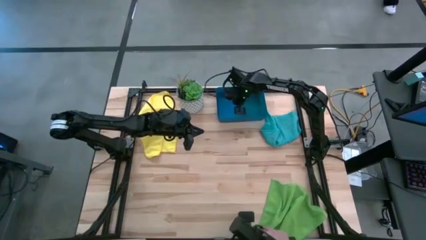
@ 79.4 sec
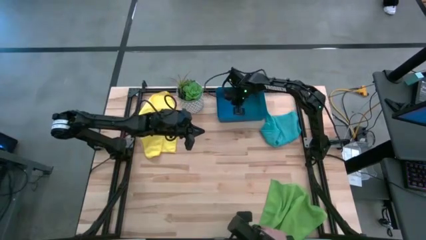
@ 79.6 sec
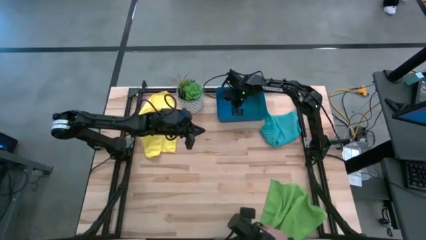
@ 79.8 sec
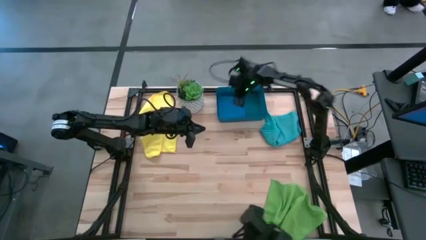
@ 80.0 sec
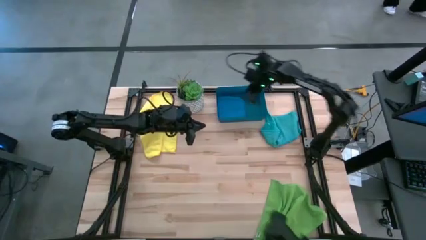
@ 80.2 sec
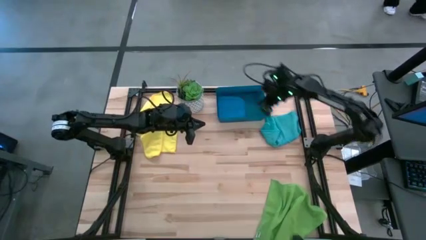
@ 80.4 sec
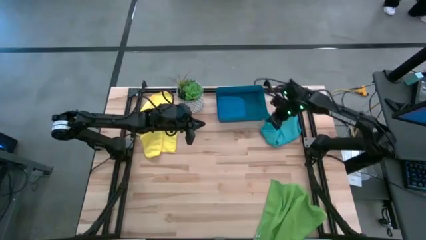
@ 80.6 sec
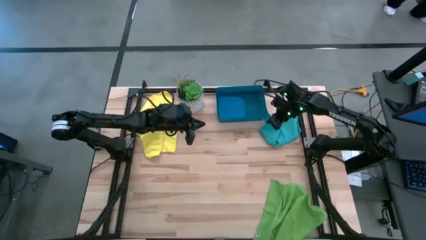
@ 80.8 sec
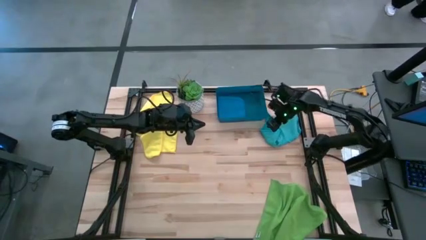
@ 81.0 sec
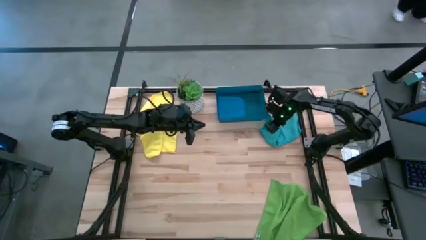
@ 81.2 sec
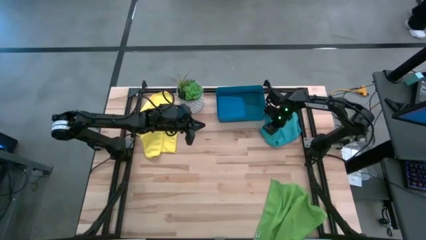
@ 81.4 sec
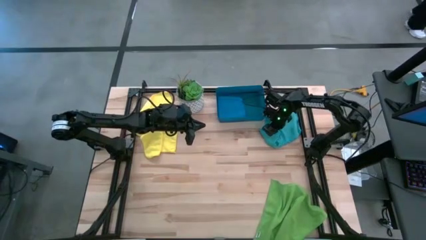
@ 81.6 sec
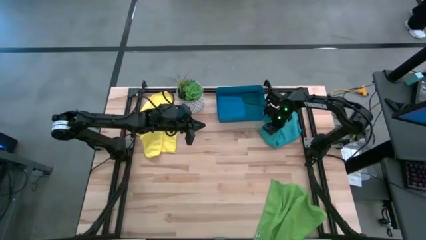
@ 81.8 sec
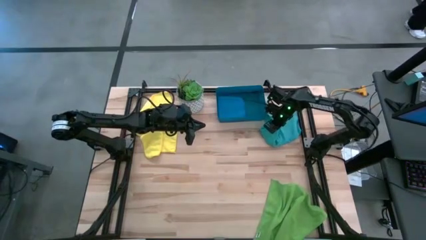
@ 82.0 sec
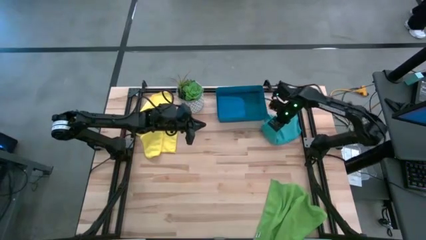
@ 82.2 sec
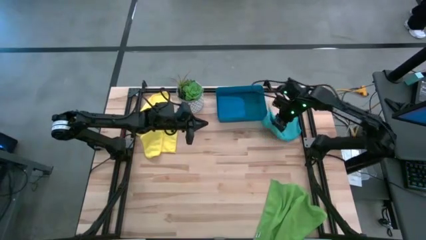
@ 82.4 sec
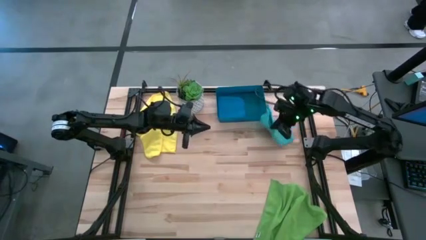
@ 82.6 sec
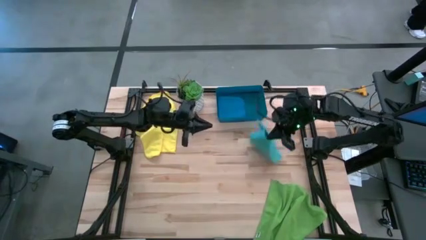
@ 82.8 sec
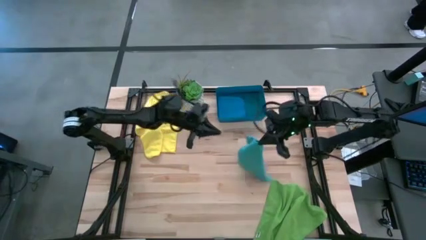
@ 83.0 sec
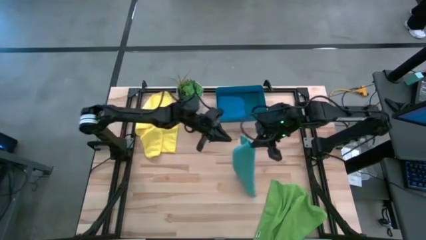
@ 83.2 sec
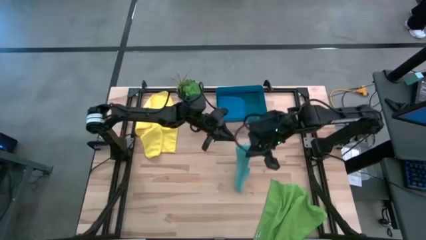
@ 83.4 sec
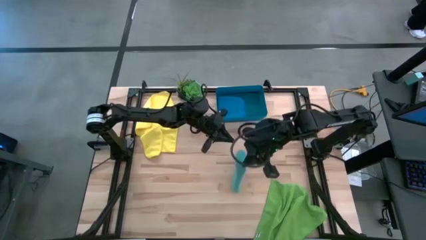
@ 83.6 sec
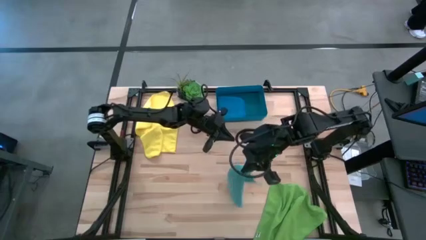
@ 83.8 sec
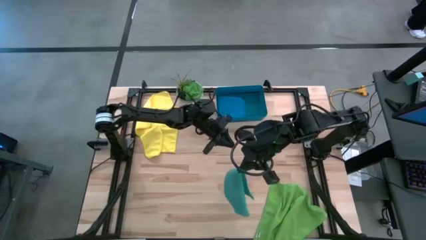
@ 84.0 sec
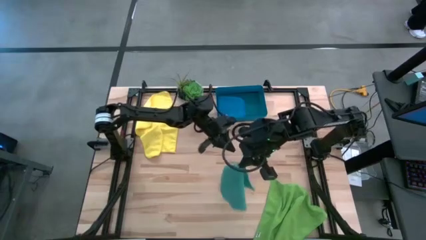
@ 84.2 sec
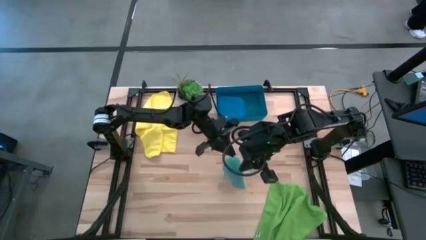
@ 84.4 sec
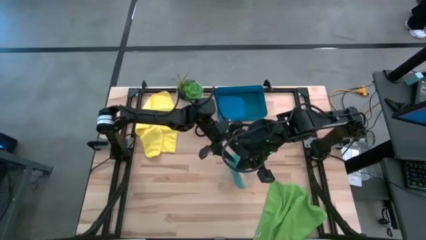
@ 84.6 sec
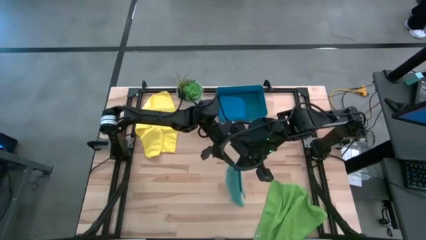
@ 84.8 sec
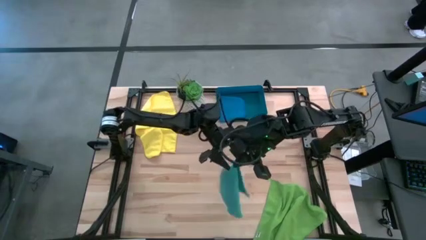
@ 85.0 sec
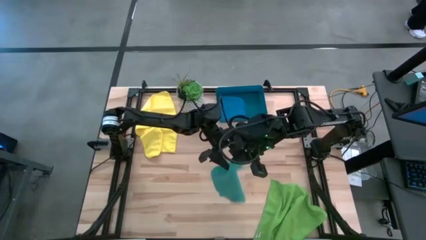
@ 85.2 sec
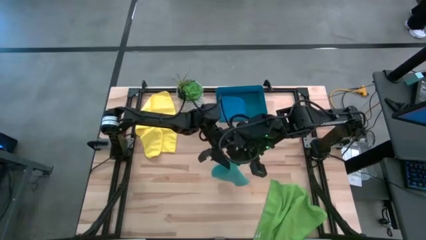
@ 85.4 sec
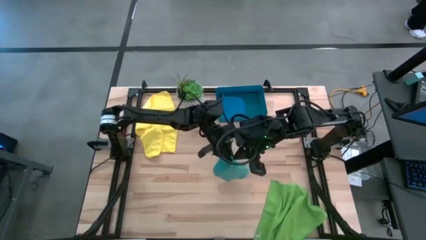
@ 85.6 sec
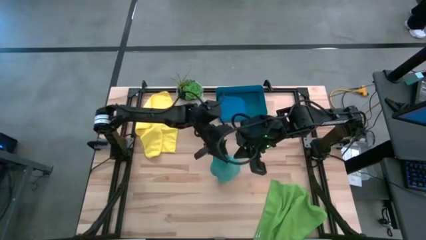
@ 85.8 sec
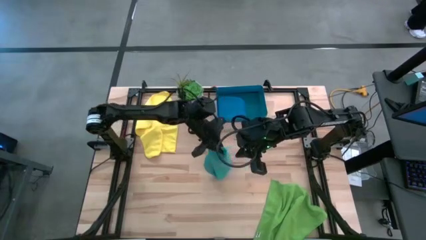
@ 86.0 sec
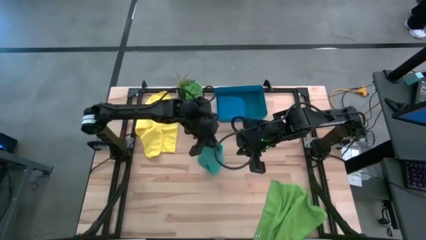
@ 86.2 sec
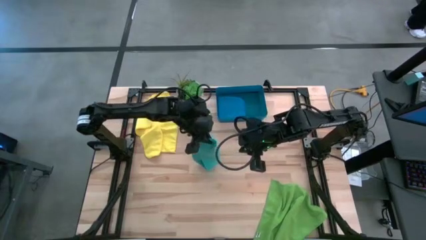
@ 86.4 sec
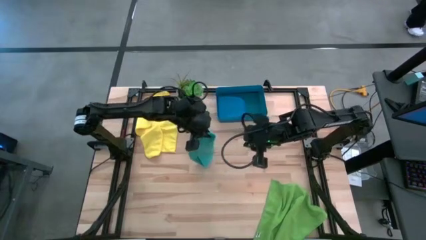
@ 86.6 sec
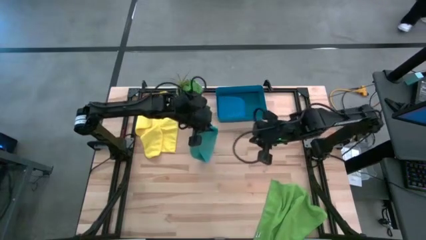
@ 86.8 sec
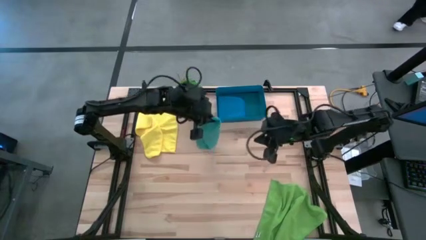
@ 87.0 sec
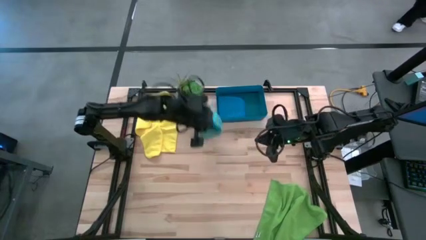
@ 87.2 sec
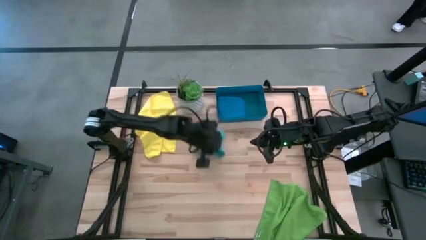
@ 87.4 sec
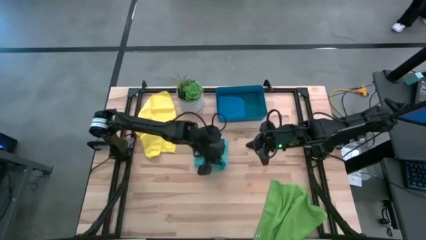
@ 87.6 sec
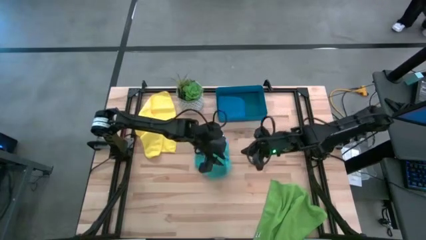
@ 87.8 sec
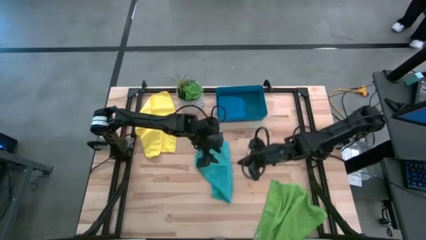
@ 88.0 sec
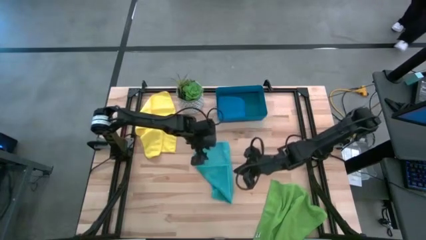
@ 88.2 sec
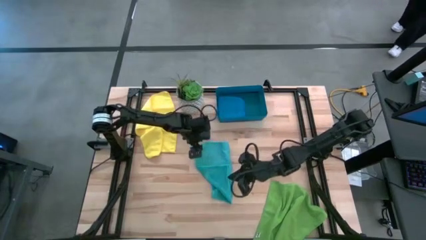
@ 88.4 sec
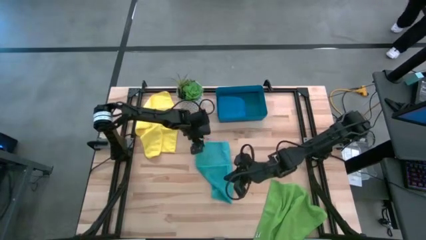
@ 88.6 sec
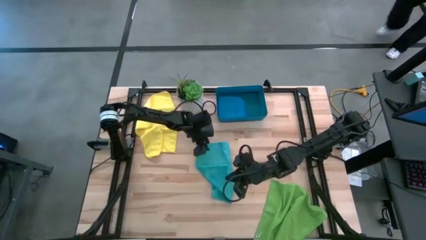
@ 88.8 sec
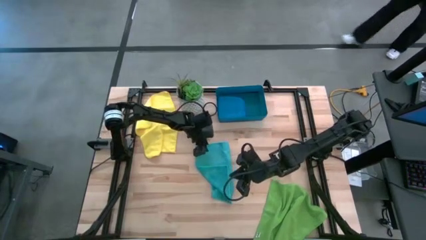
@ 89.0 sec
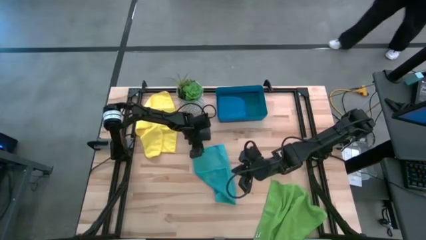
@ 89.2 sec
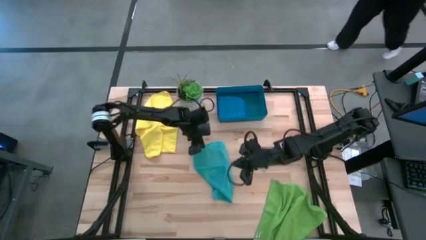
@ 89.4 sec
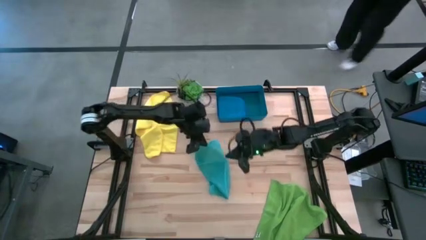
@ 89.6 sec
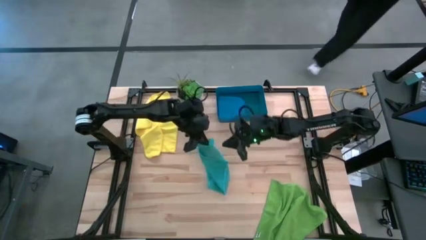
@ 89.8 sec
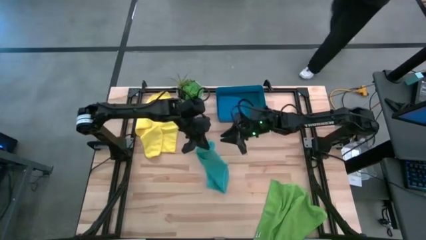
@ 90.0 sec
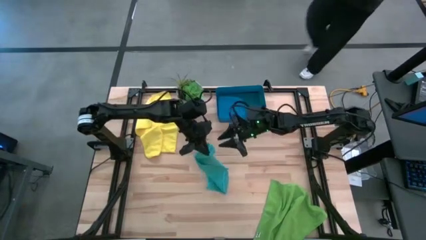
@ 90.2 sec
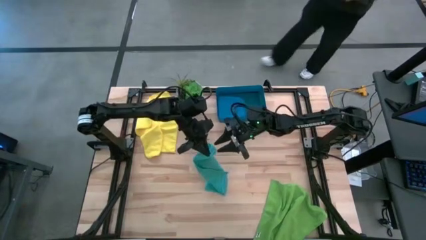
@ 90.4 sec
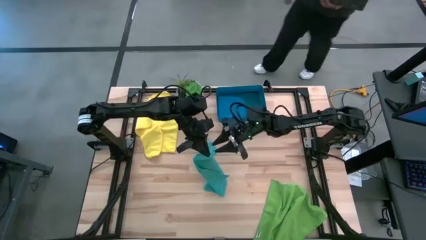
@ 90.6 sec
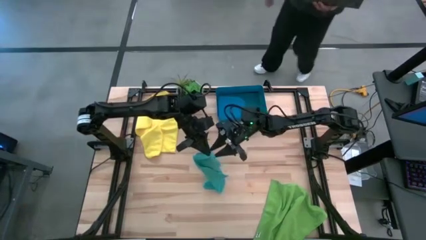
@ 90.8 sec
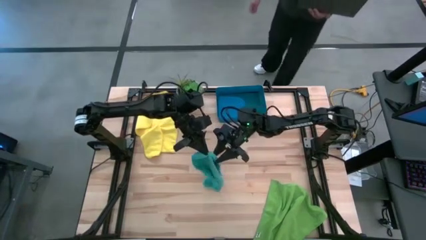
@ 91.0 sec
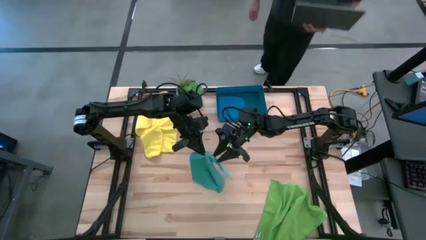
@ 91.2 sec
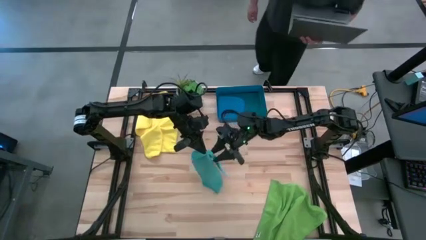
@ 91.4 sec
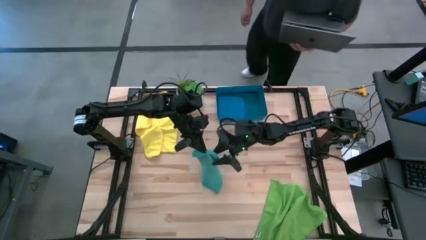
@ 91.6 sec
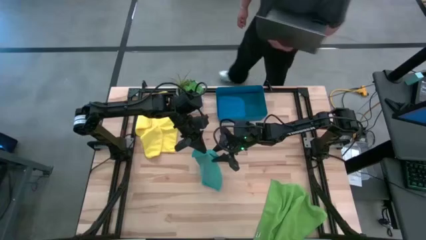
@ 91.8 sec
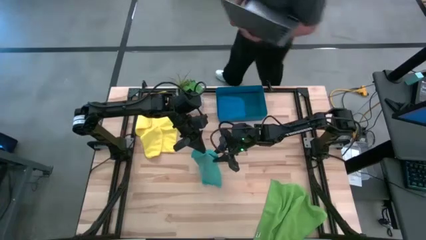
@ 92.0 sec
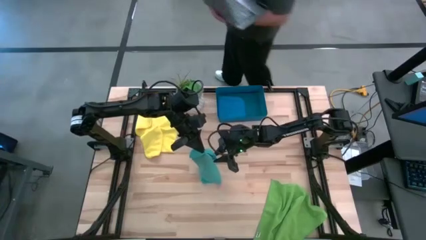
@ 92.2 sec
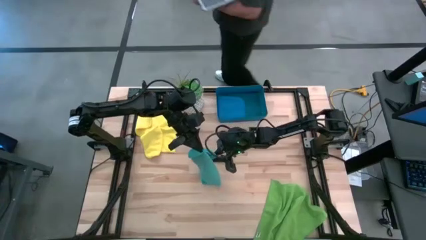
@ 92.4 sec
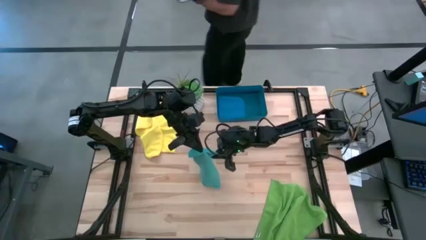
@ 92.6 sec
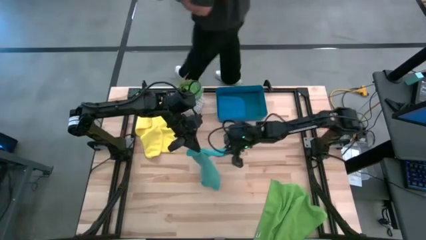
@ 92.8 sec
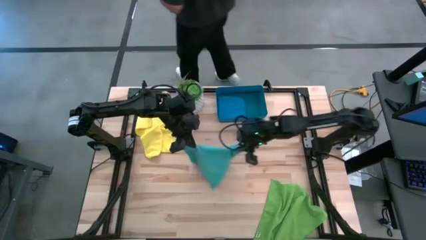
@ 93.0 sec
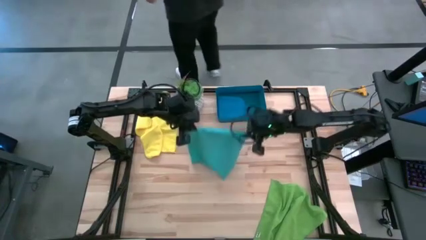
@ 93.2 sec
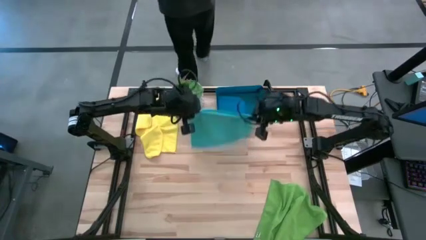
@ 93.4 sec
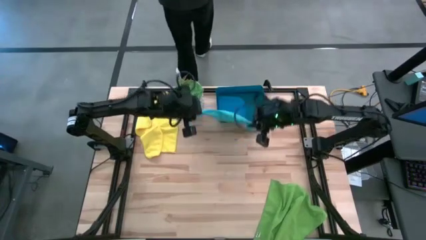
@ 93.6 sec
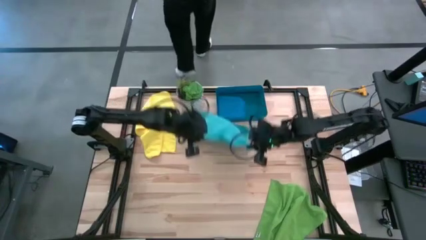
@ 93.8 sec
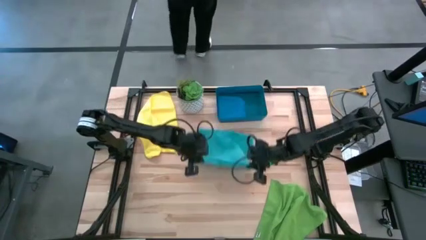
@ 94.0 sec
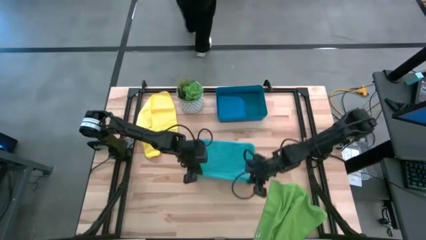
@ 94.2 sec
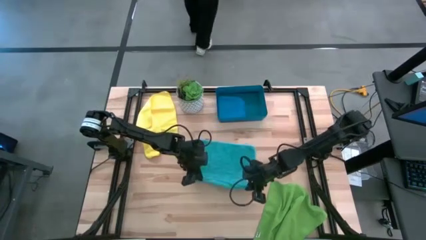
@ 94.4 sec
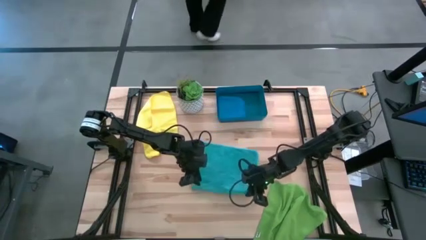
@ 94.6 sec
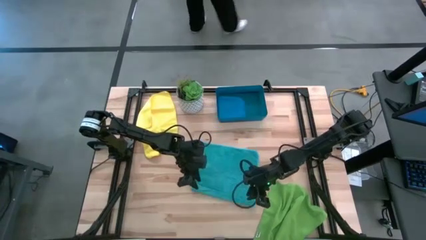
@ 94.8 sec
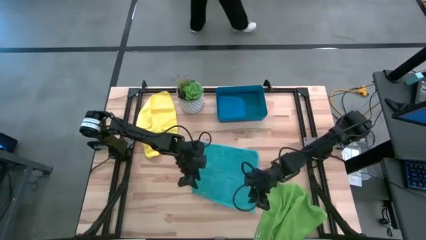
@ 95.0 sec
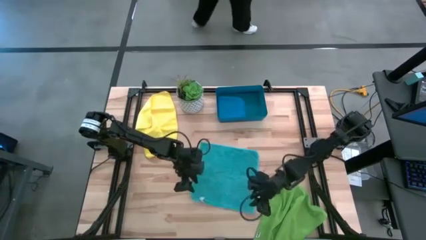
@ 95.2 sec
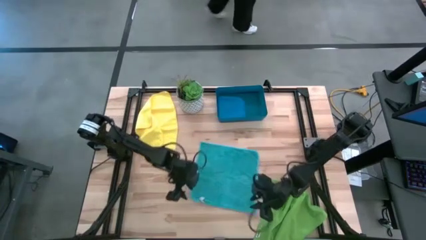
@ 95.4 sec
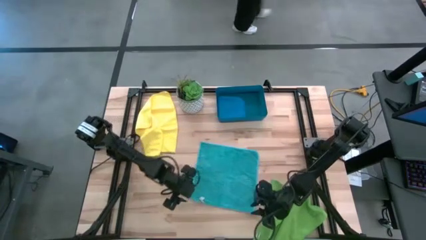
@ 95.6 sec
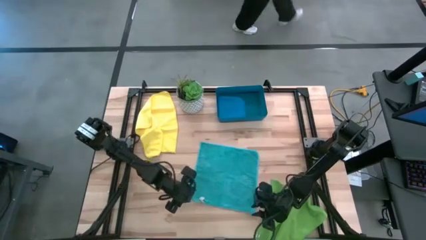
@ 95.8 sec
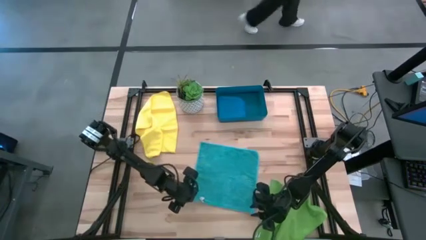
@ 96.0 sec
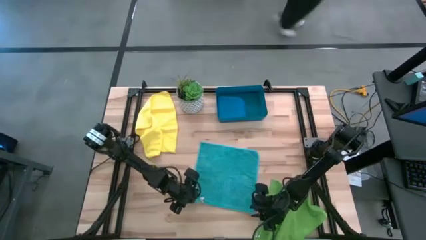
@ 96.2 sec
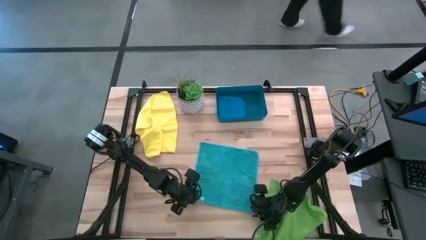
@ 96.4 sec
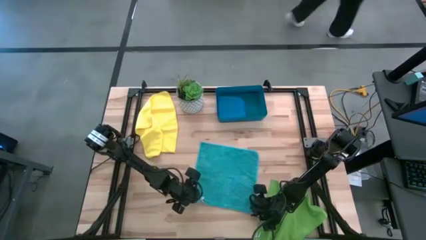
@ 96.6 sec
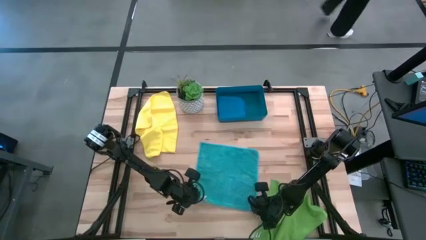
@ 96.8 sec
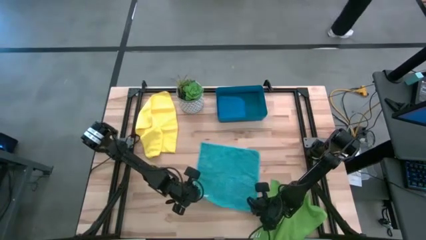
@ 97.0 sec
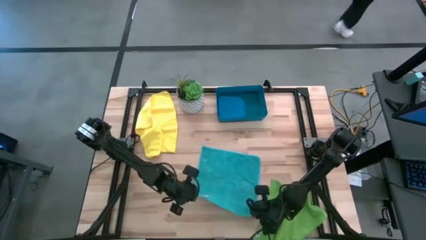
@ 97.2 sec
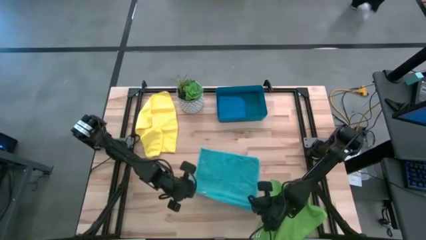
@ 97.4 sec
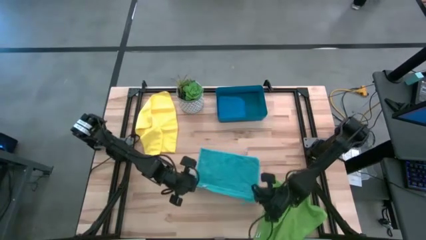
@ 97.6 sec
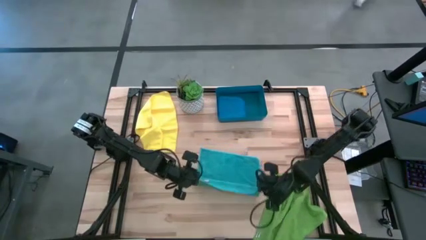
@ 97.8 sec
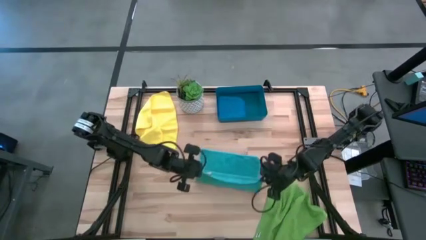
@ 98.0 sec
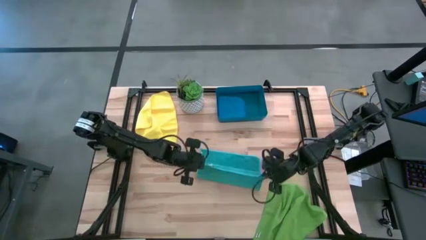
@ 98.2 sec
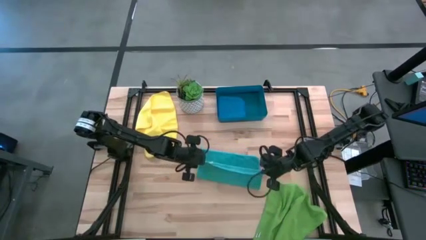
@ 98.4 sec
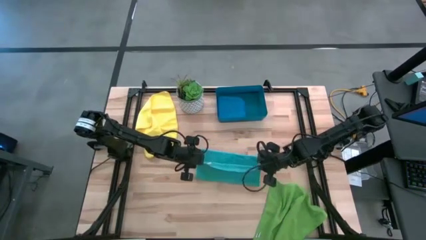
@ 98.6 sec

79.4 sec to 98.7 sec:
Task: Fold microfiber towels
Fold the light blue microfiber towel on top of the dark blue microfiber towel into the dark blue bin
